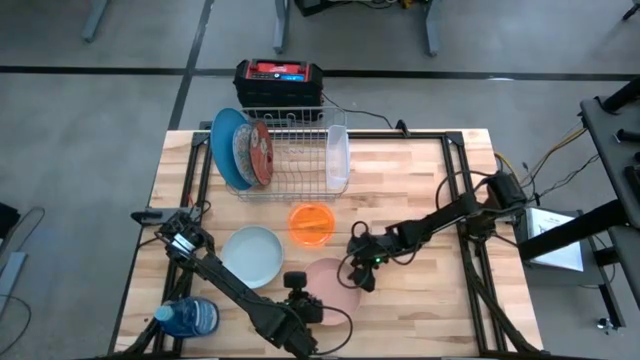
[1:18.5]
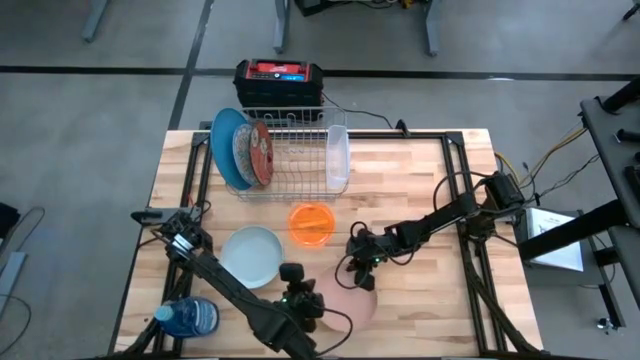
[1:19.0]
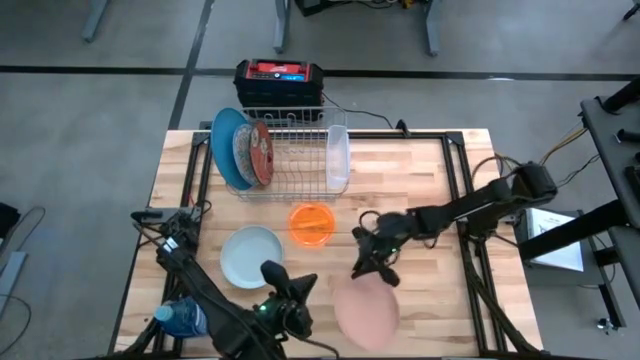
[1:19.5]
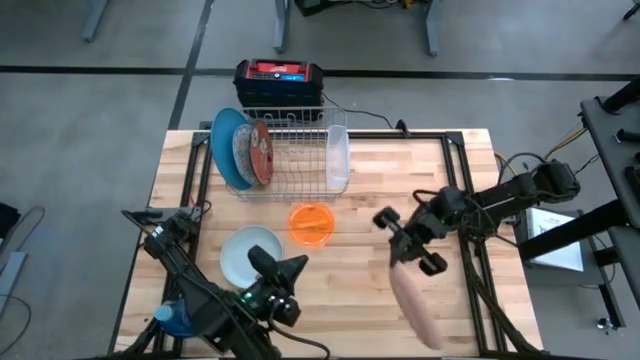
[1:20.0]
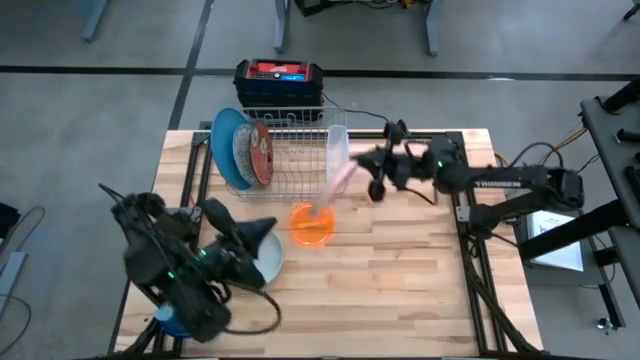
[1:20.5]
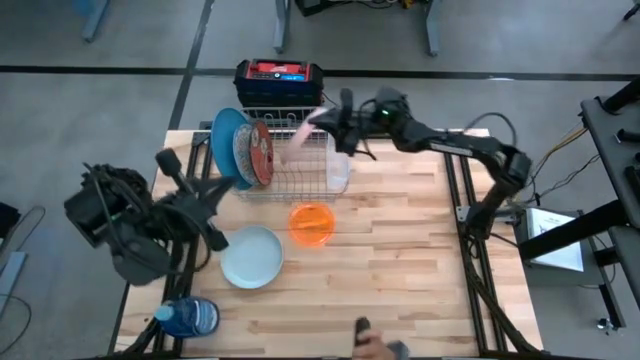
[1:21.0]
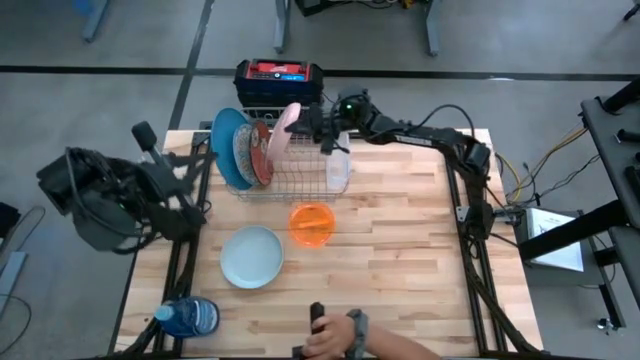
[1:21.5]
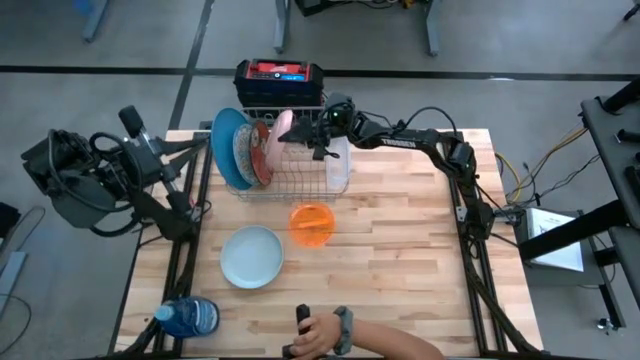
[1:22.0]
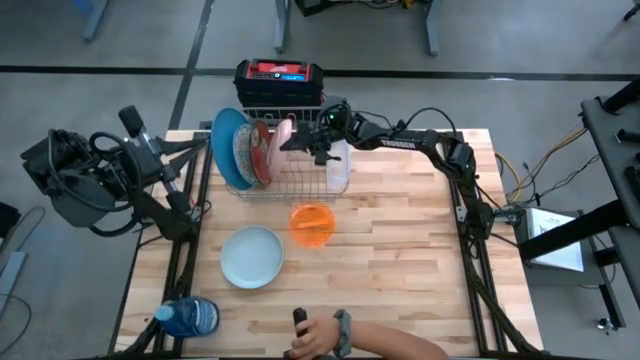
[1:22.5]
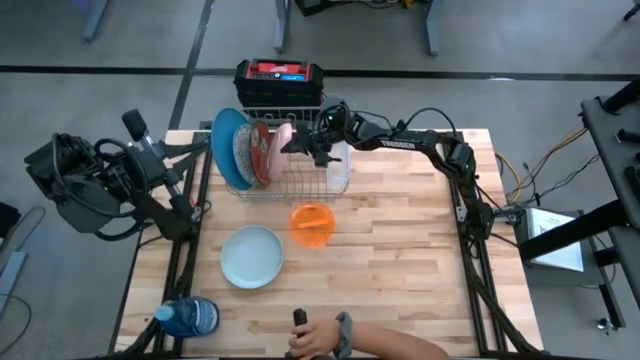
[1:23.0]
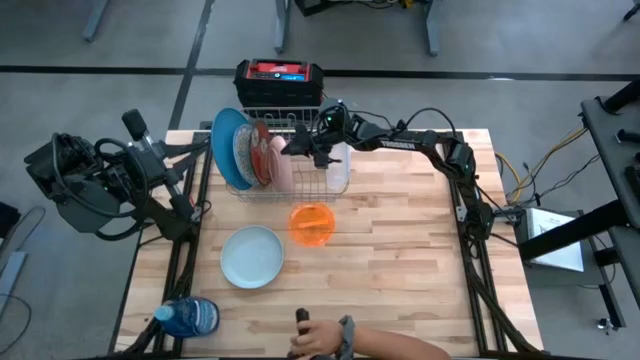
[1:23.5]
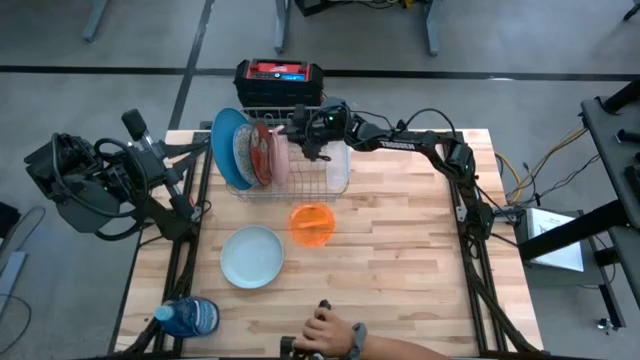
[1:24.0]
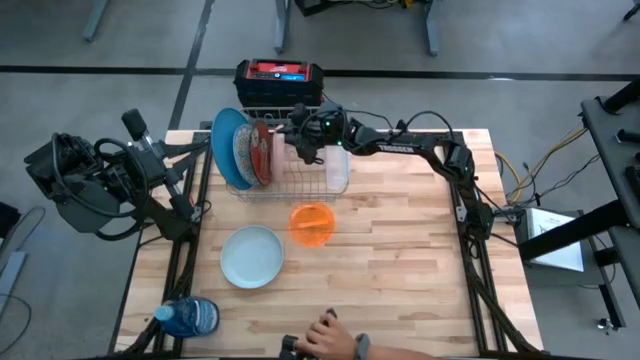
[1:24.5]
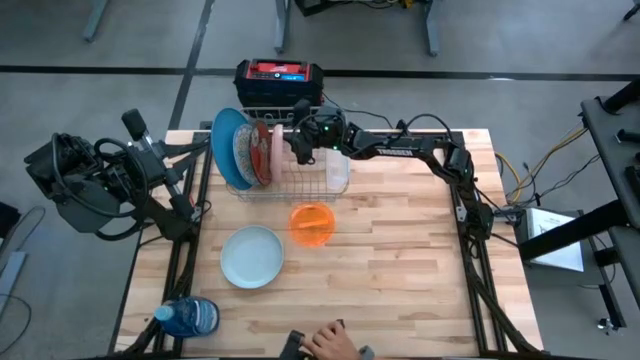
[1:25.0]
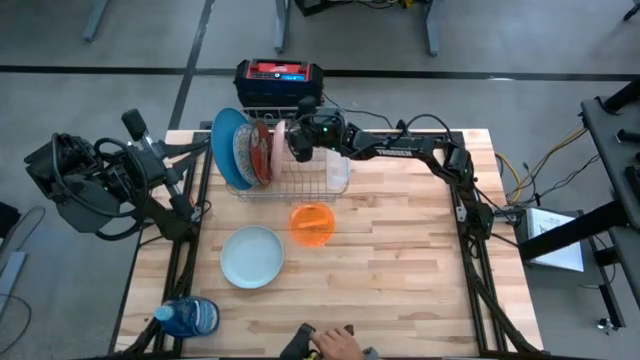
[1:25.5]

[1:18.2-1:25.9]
Task: Sort dishes
Put the pink plate in the dishwasher rack

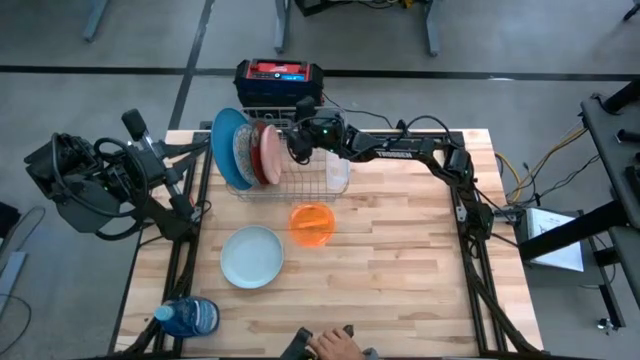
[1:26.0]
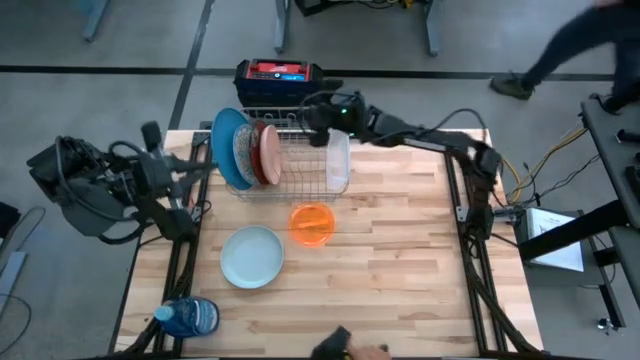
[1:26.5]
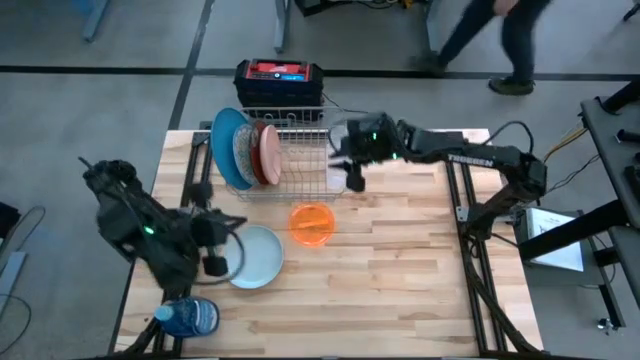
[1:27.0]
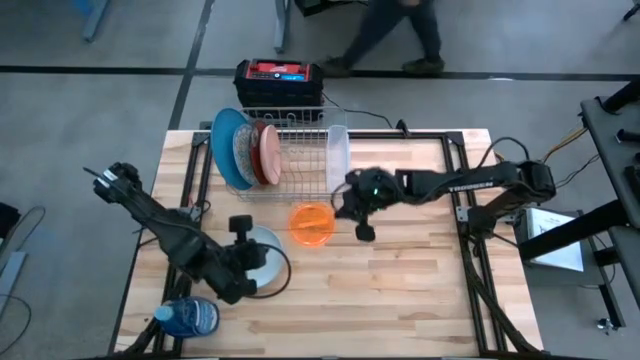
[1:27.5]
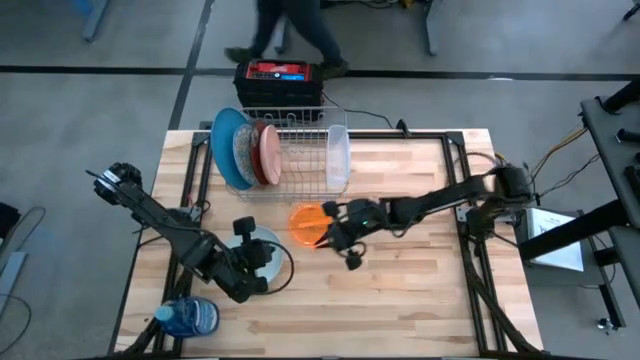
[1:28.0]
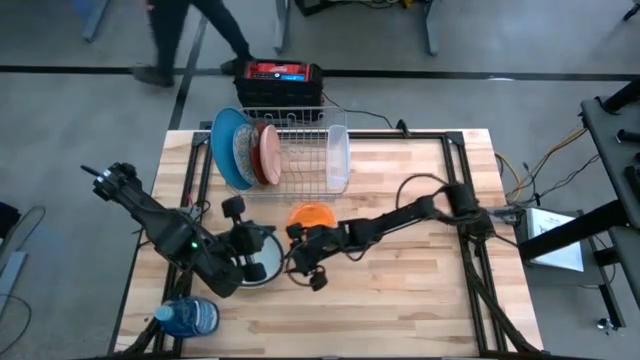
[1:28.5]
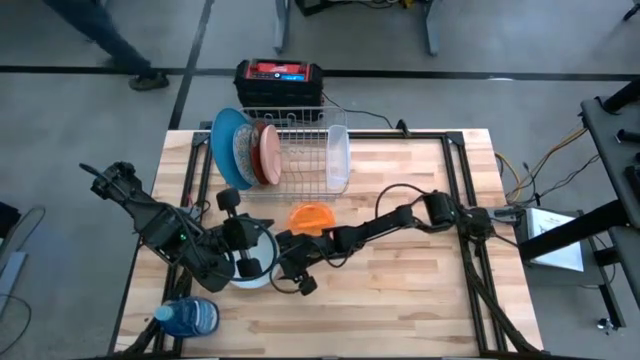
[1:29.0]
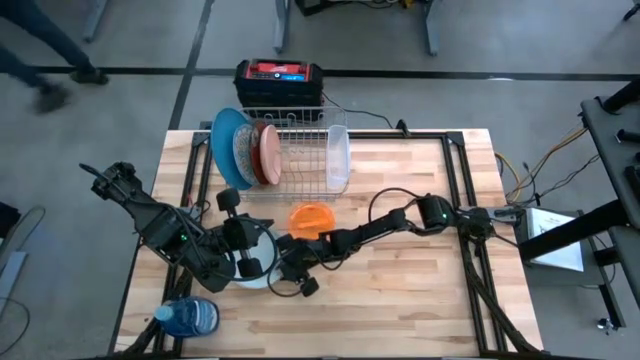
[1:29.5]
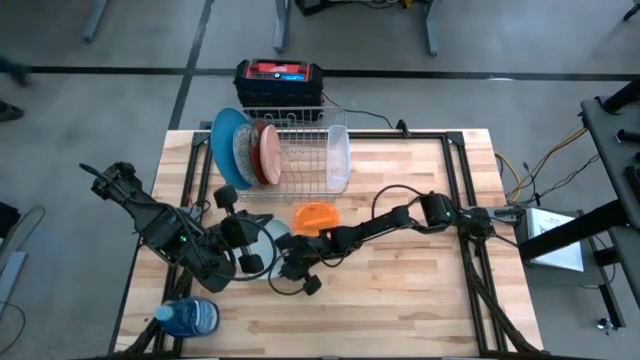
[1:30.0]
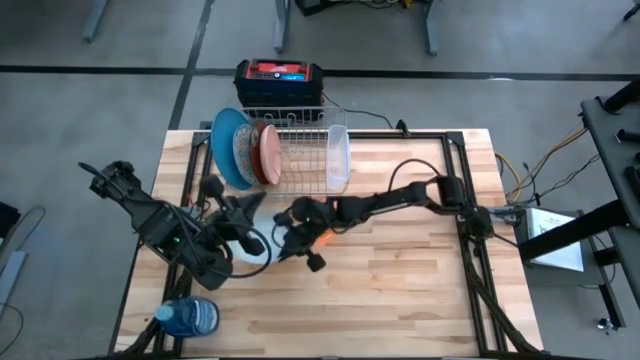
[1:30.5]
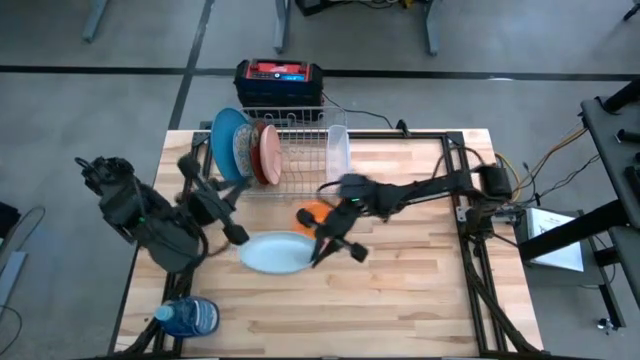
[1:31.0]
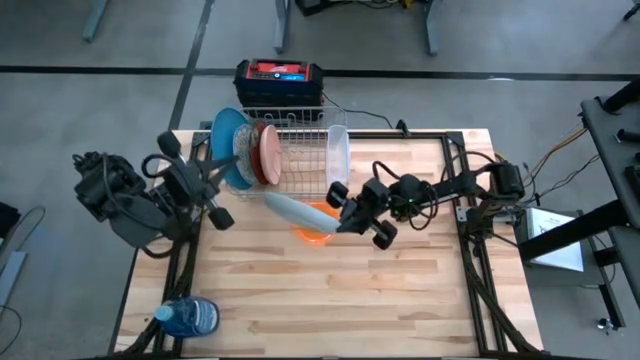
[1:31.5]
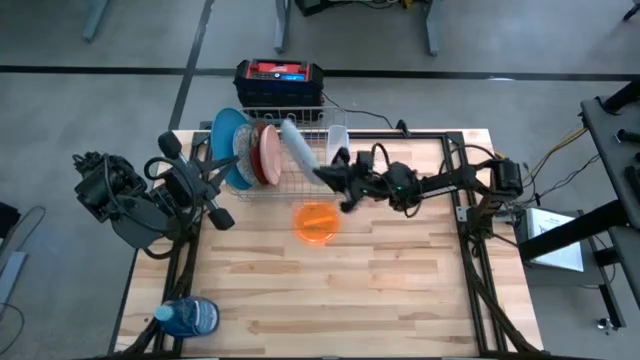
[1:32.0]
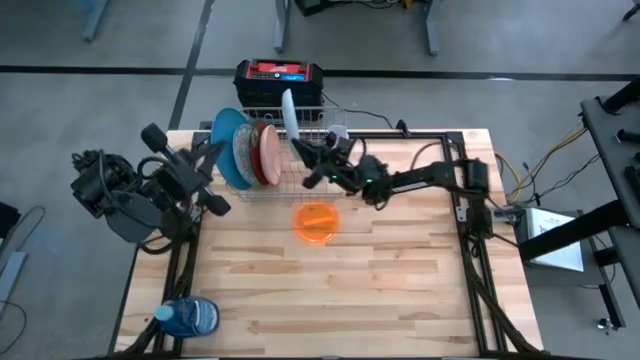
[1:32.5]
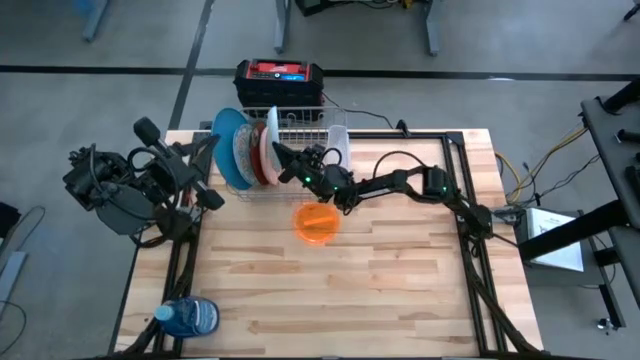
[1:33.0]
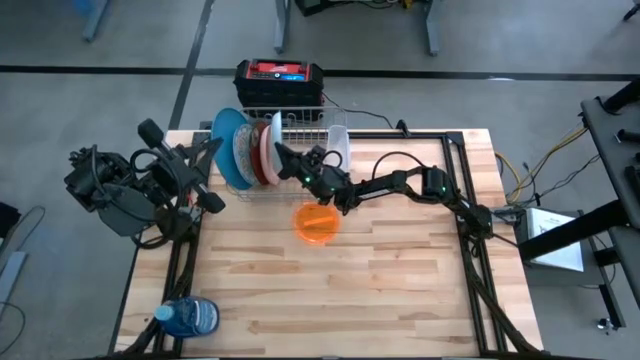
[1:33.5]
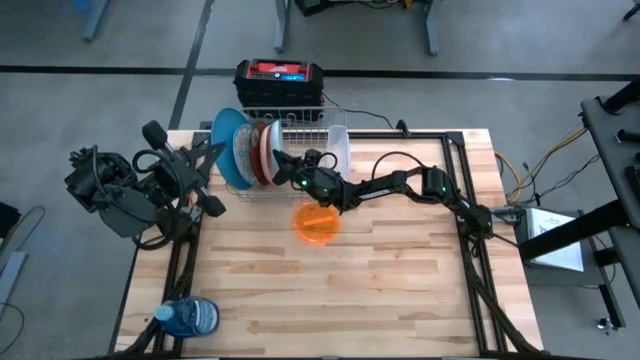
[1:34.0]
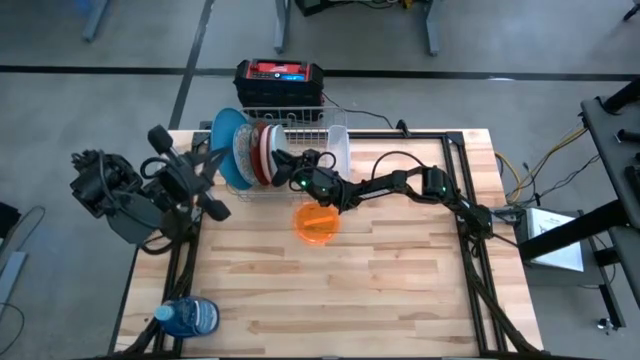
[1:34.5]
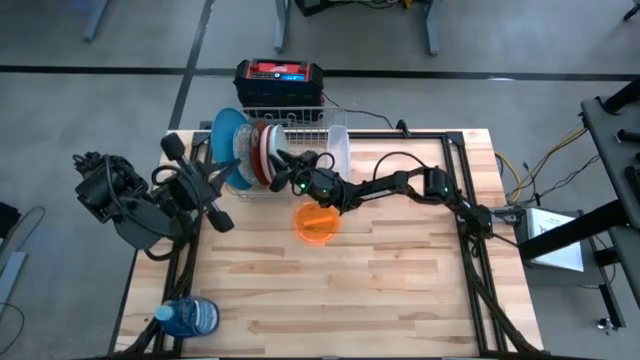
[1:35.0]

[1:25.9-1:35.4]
Put the white plate in the dishwasher rack

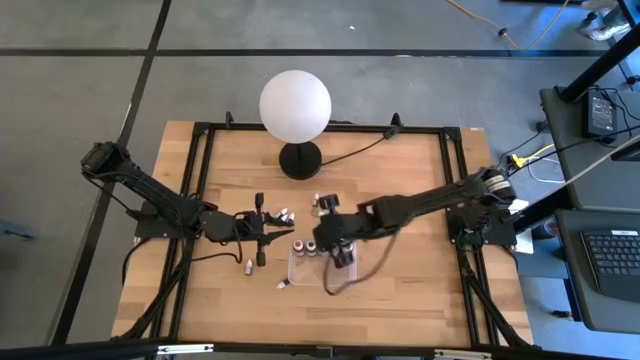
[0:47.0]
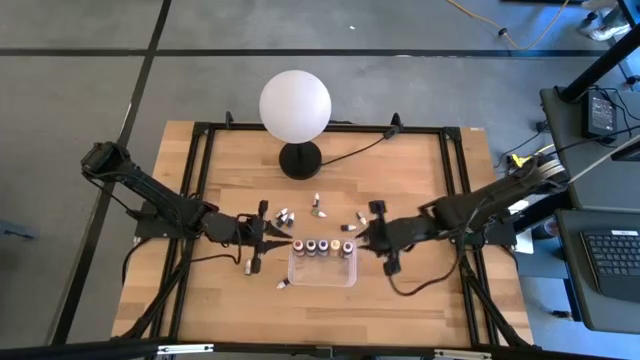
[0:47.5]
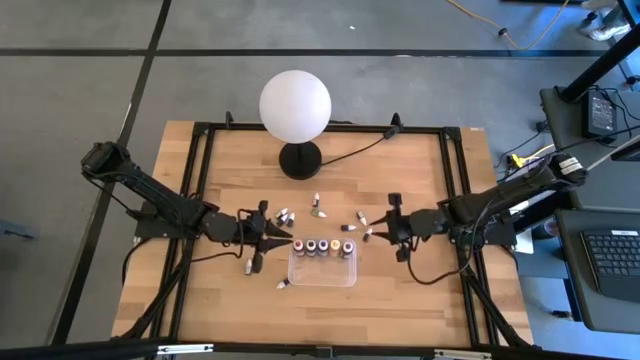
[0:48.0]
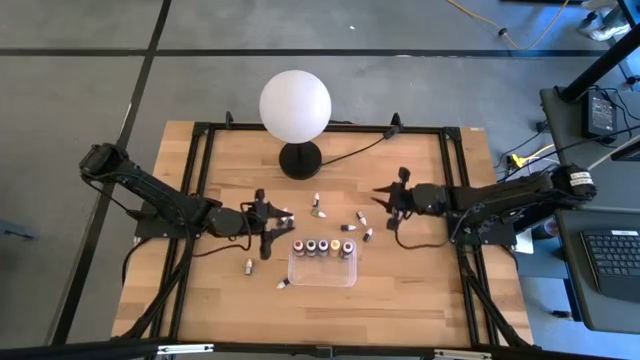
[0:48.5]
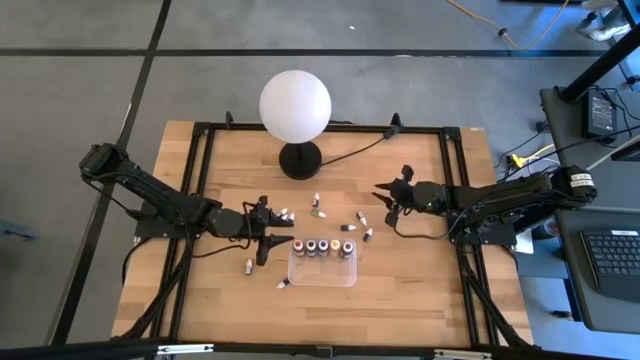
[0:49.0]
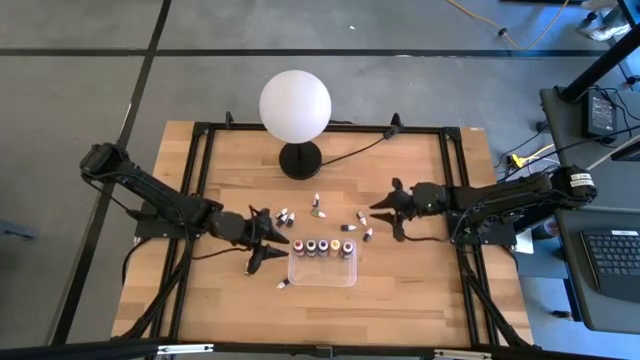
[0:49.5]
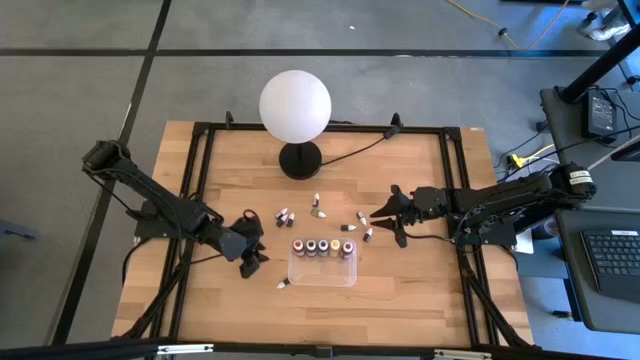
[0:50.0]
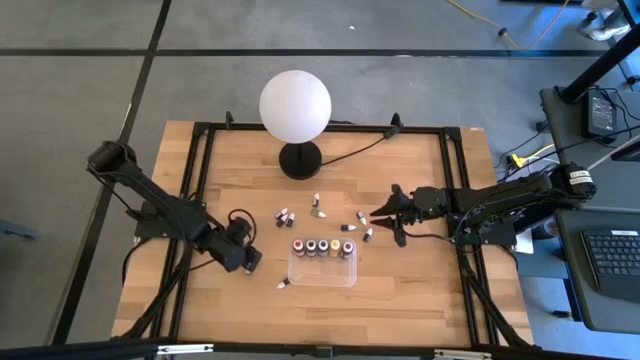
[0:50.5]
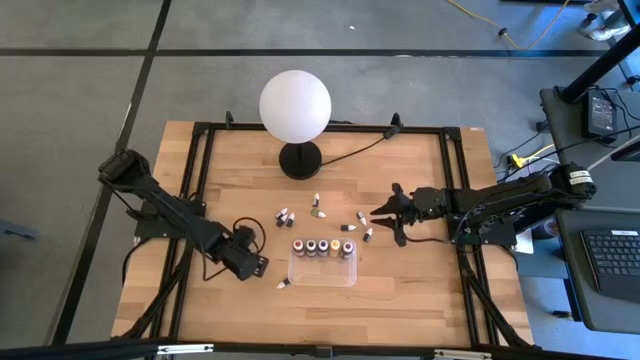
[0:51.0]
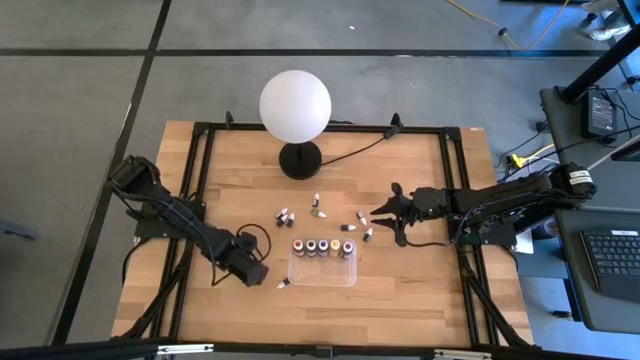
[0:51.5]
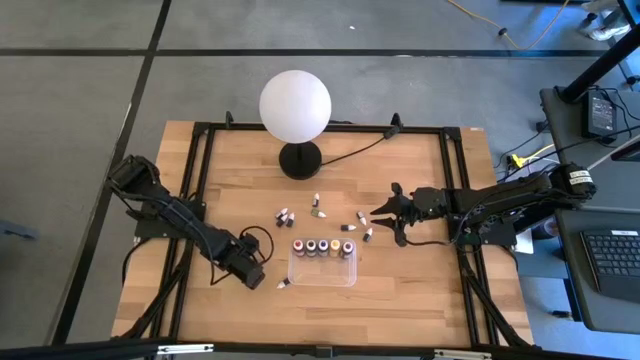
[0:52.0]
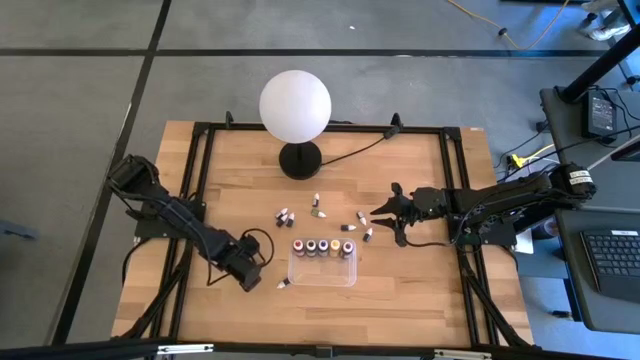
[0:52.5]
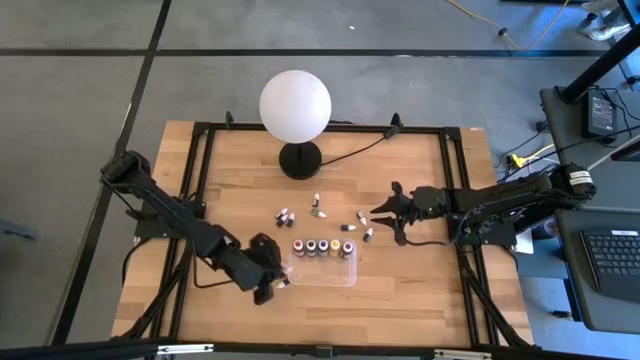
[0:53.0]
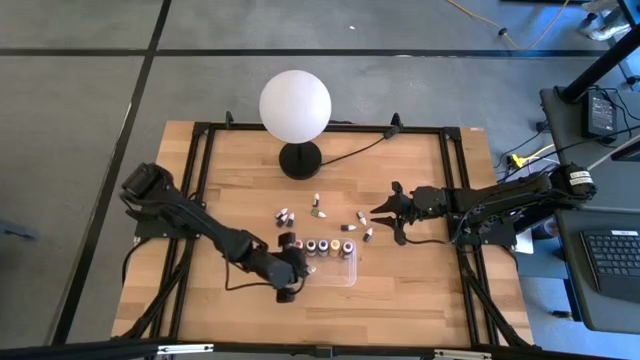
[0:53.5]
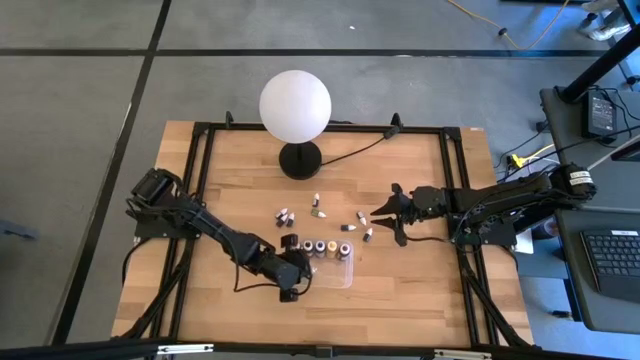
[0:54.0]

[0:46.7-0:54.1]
Task: Pick & Place food coloring
Put the small blue food coloring bottle into the transparent bin
